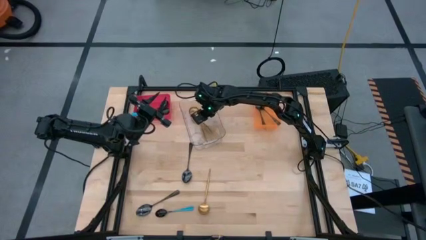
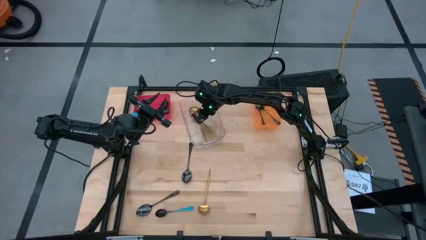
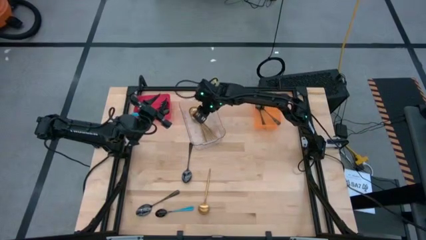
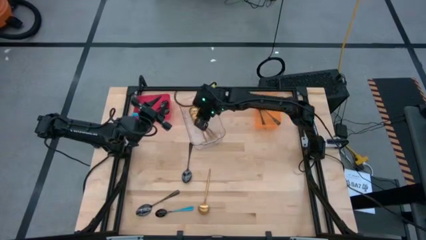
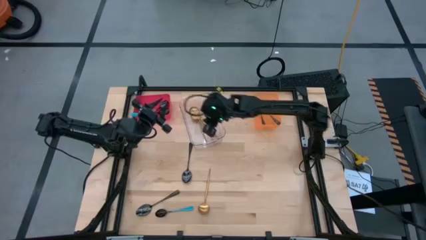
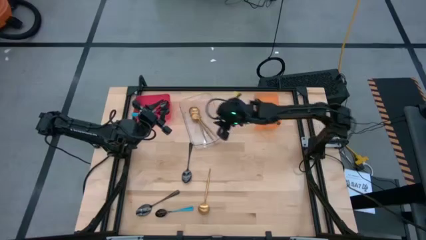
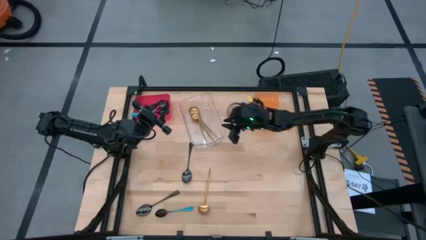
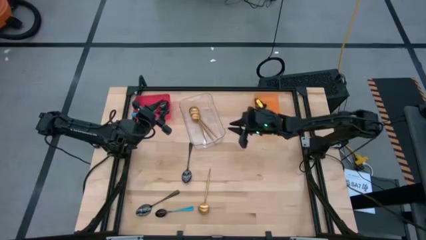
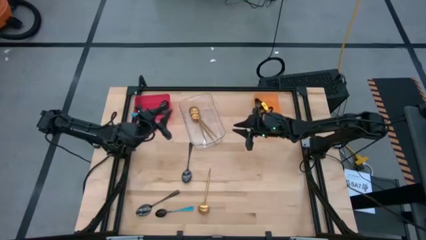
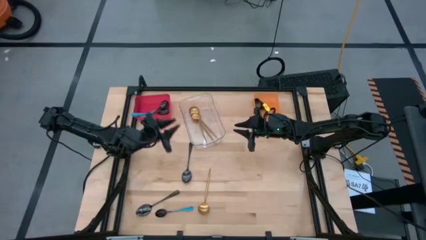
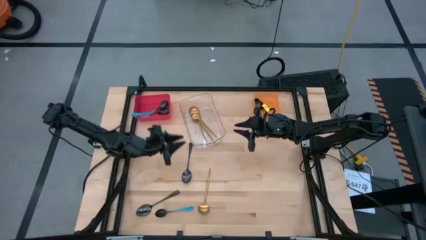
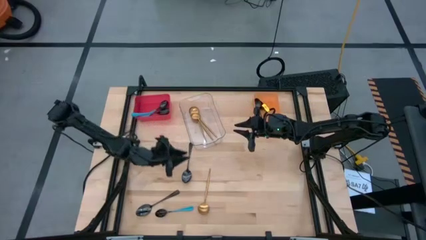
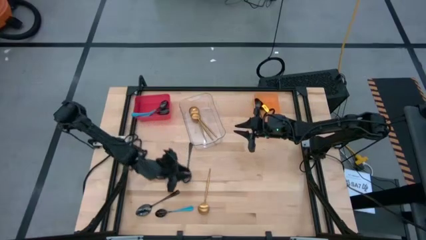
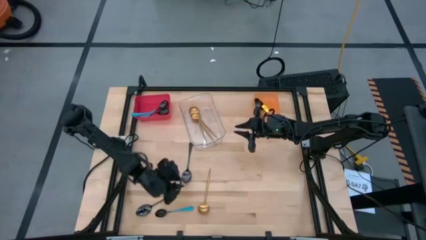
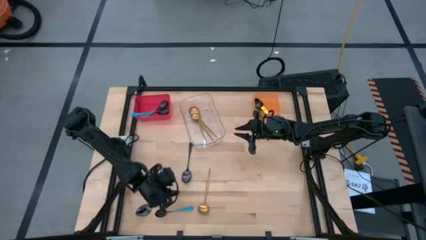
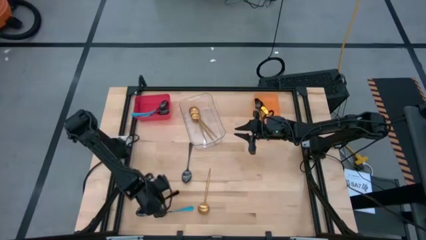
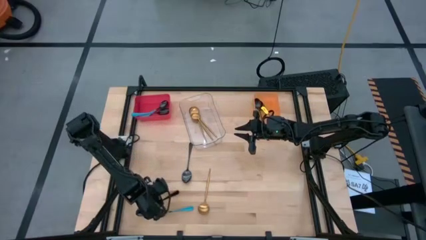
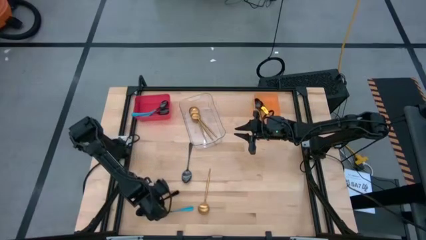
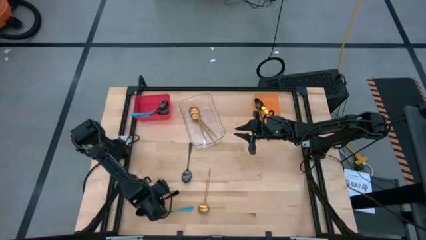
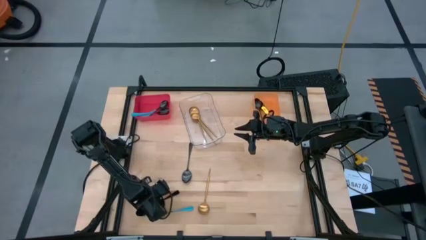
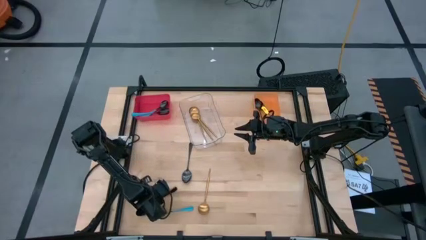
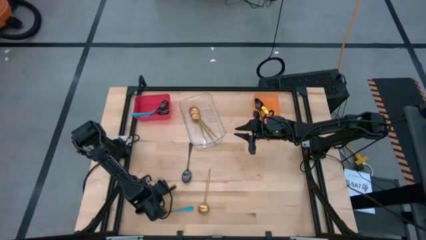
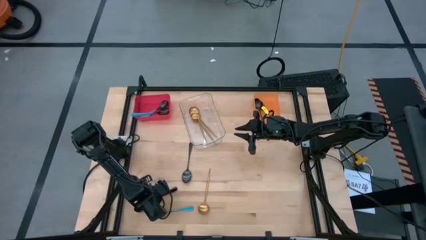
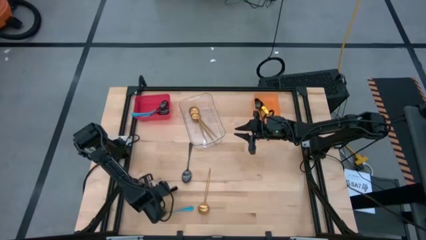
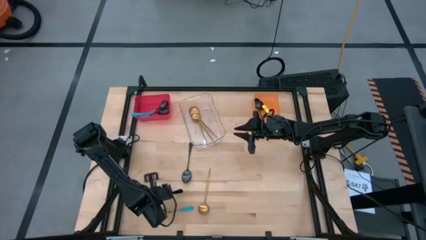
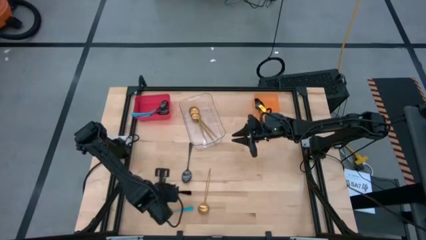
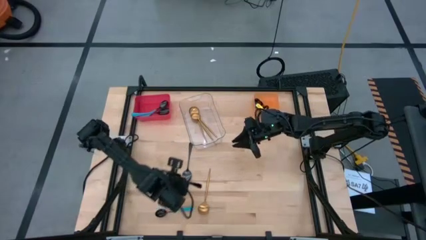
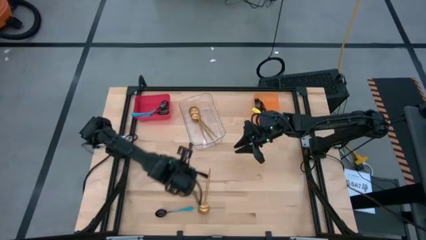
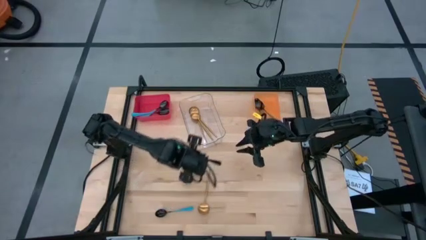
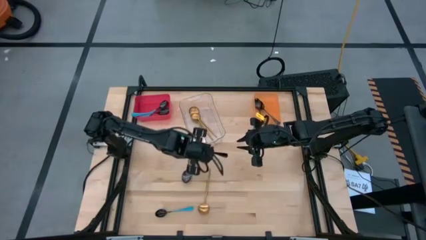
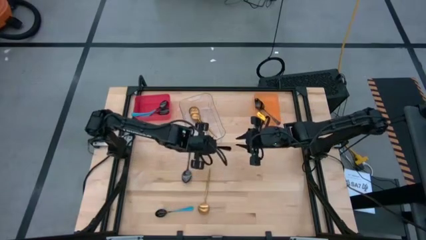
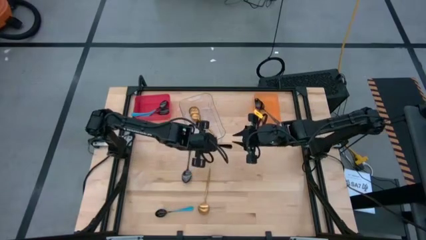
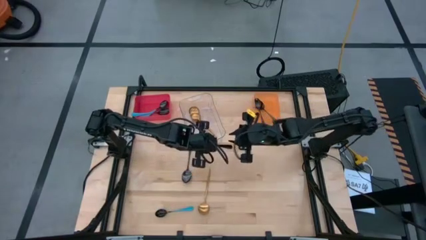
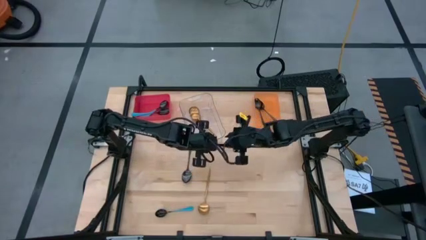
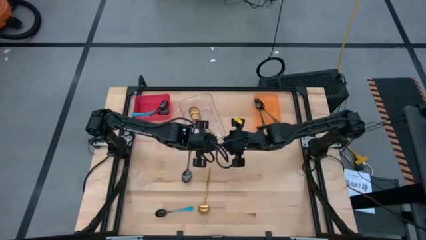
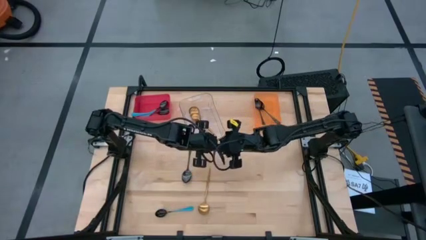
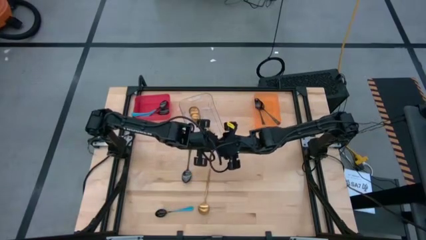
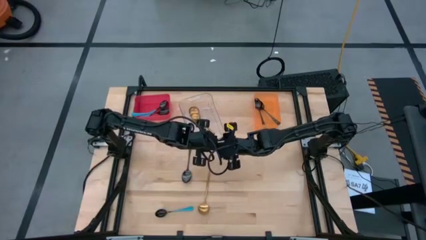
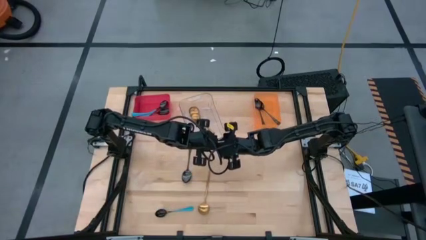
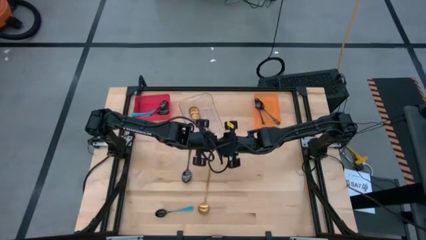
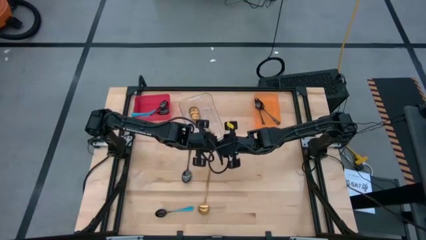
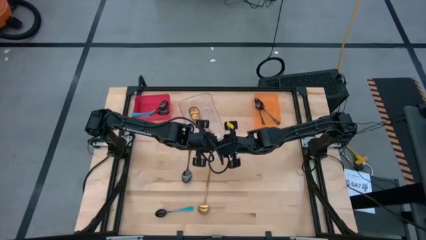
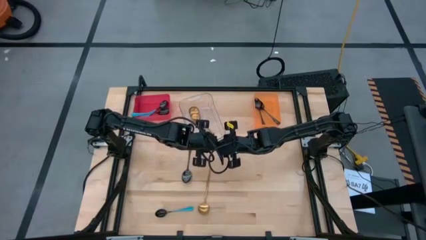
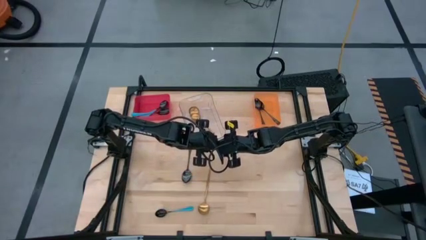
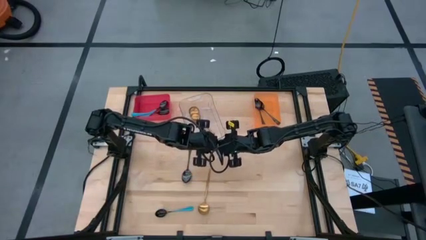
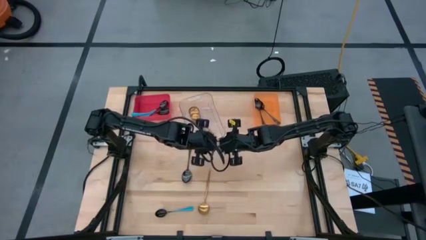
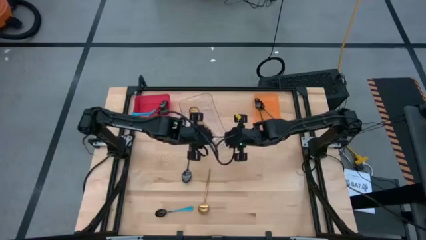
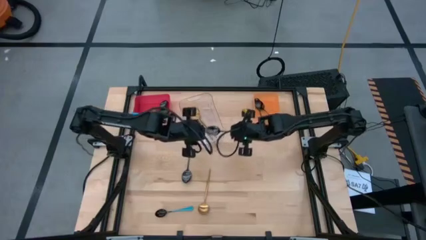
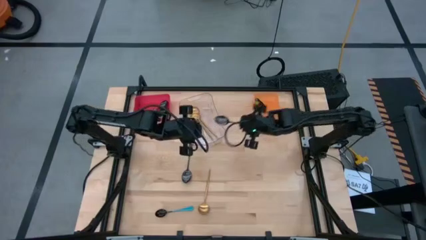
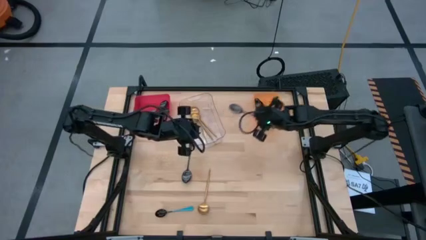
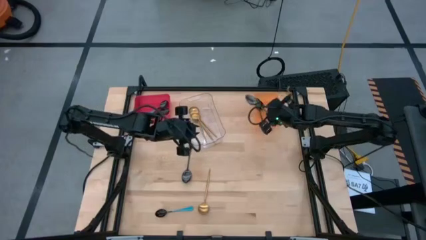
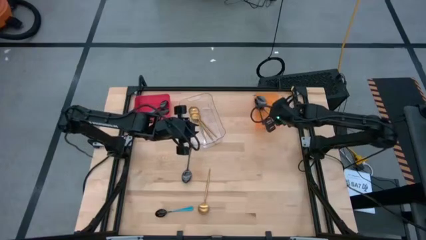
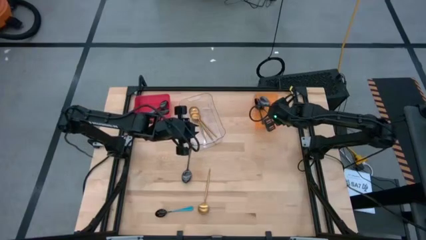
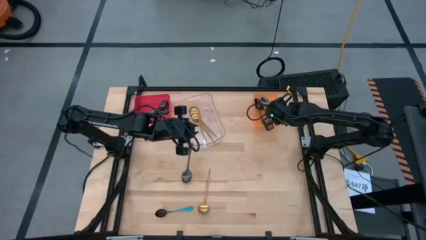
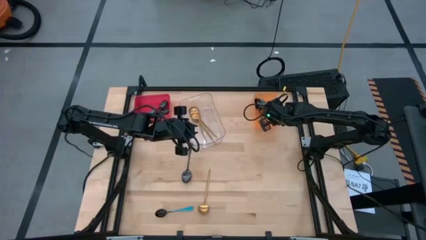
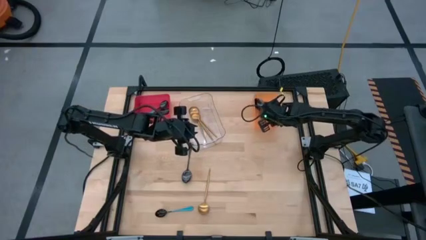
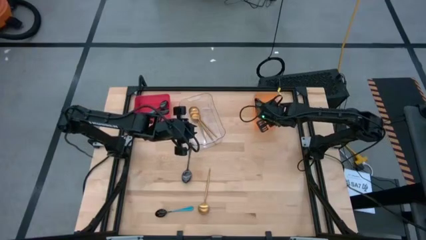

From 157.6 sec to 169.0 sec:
Task: Sort silverware by color (type)
Put the black spoon into the orange bin
